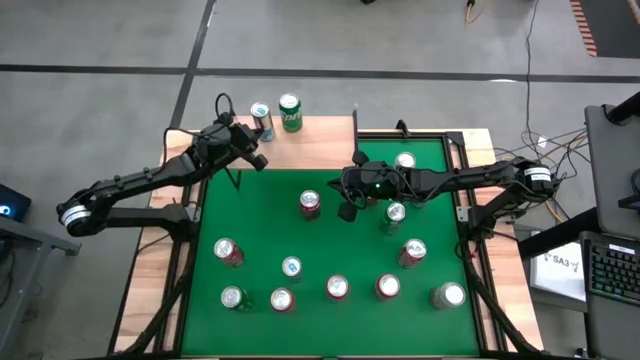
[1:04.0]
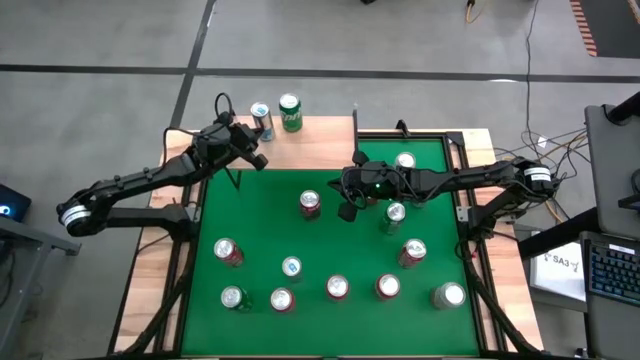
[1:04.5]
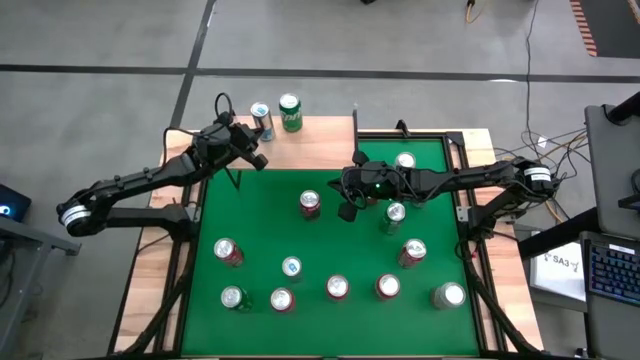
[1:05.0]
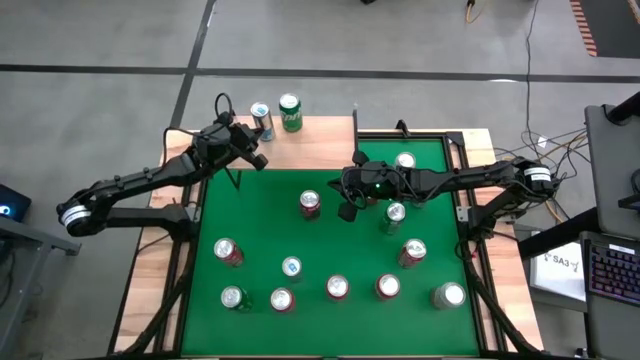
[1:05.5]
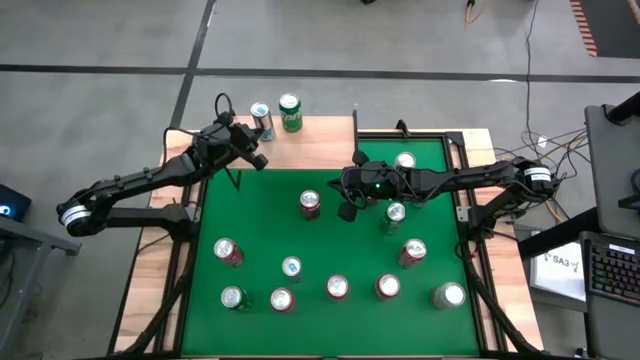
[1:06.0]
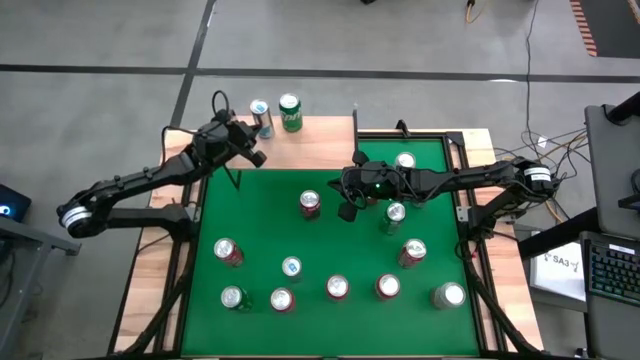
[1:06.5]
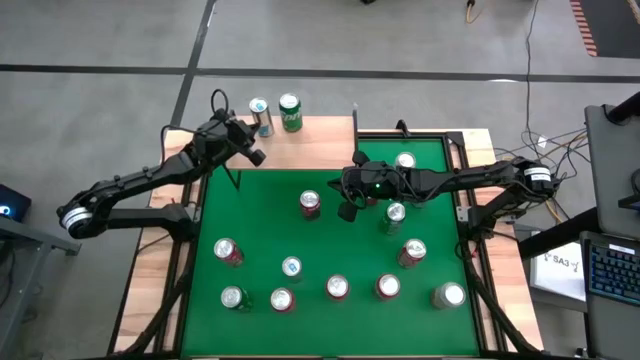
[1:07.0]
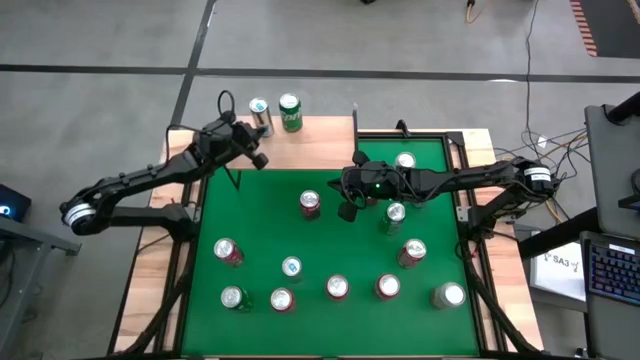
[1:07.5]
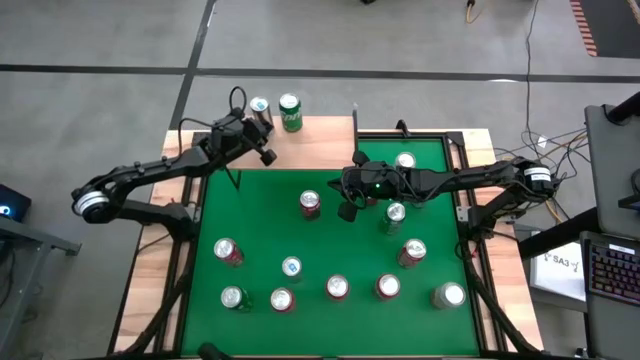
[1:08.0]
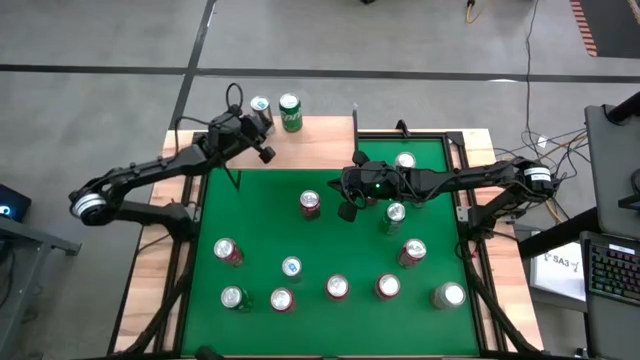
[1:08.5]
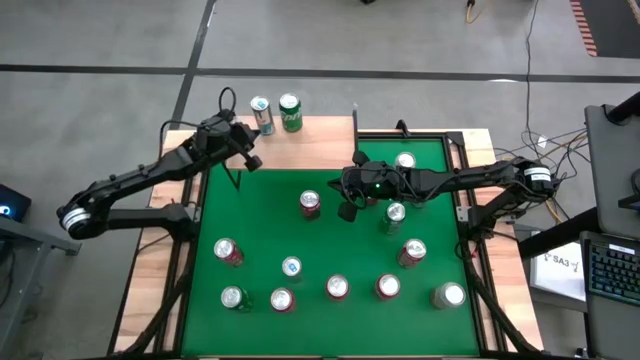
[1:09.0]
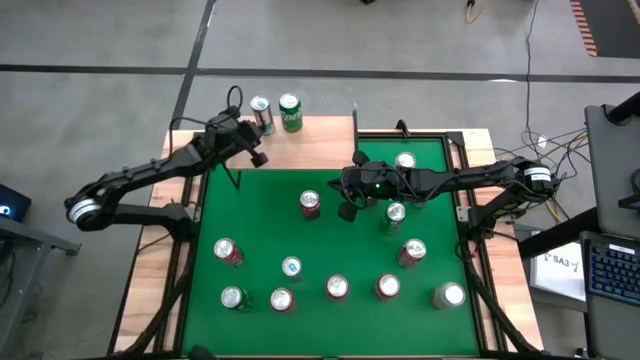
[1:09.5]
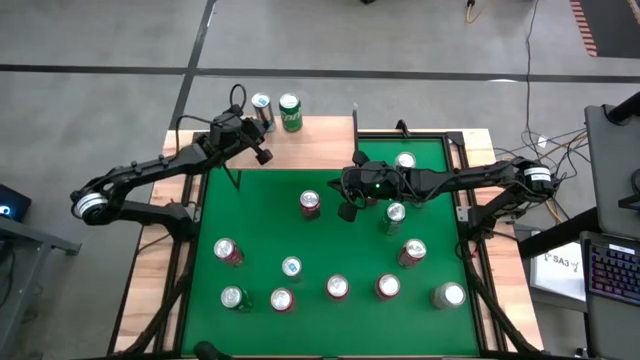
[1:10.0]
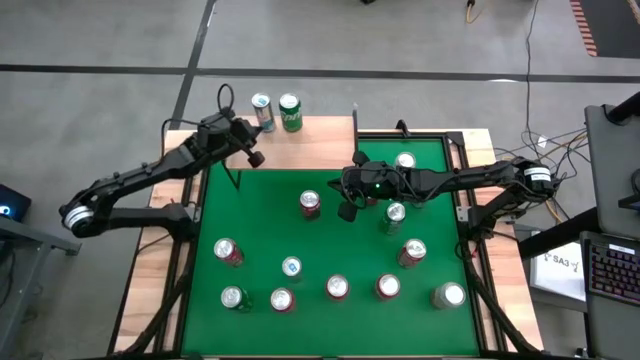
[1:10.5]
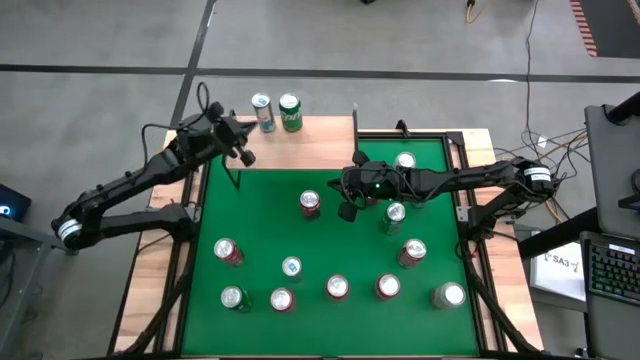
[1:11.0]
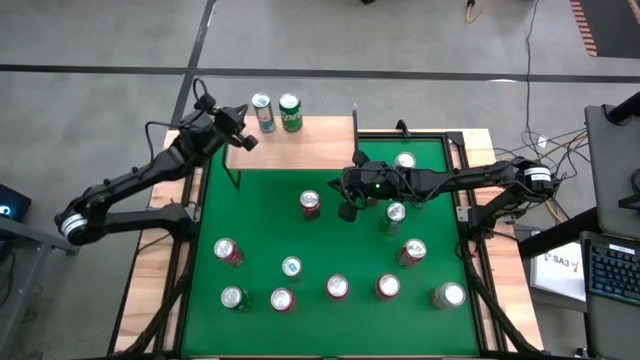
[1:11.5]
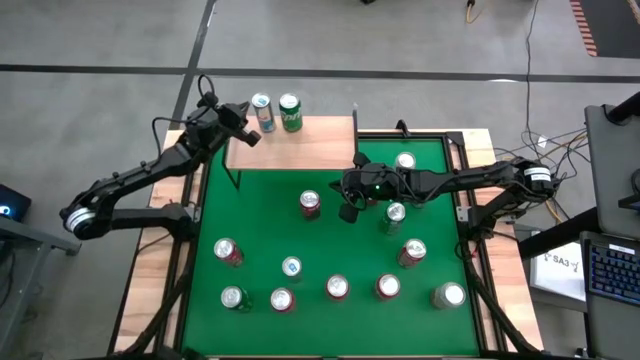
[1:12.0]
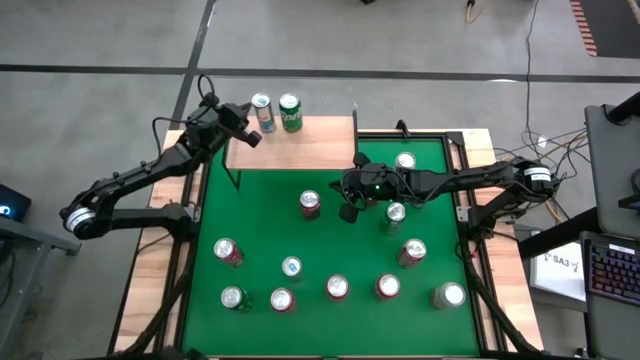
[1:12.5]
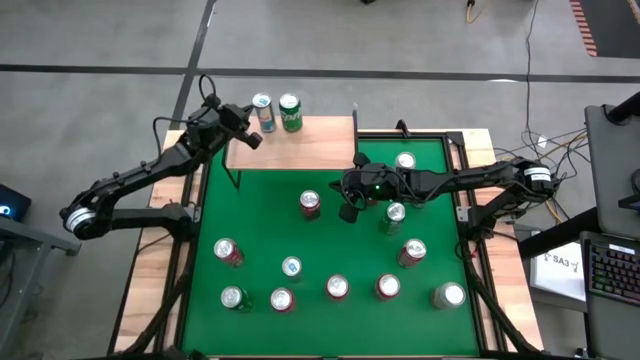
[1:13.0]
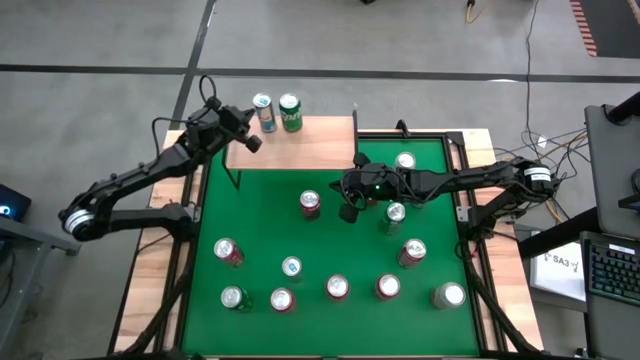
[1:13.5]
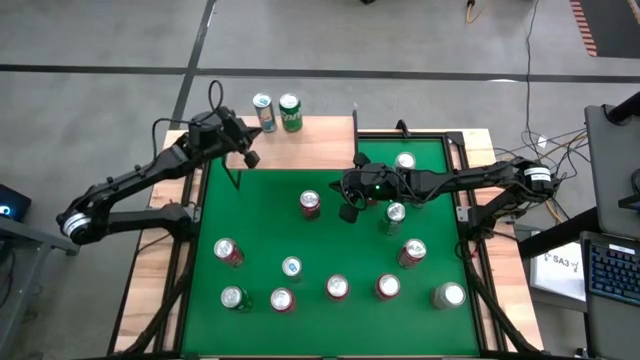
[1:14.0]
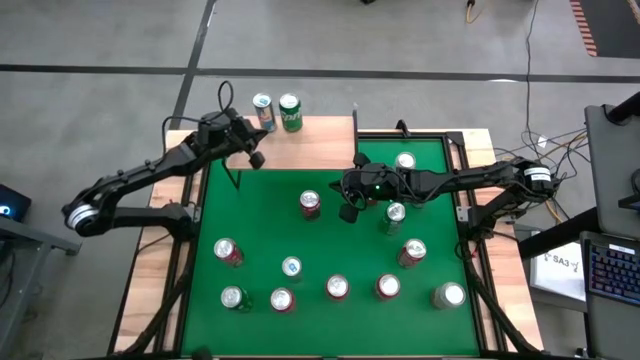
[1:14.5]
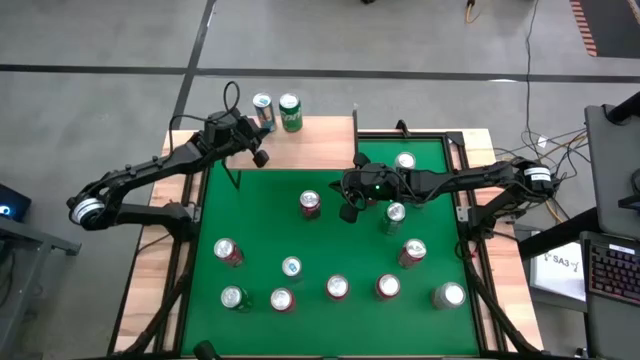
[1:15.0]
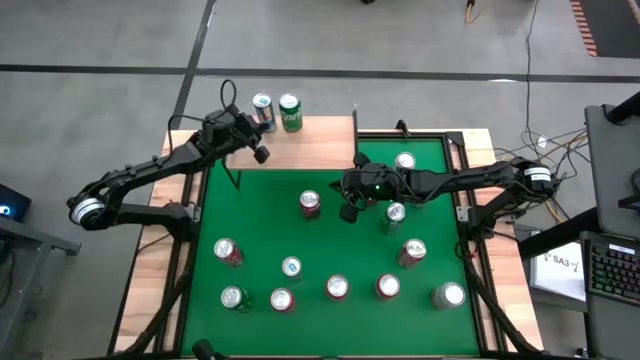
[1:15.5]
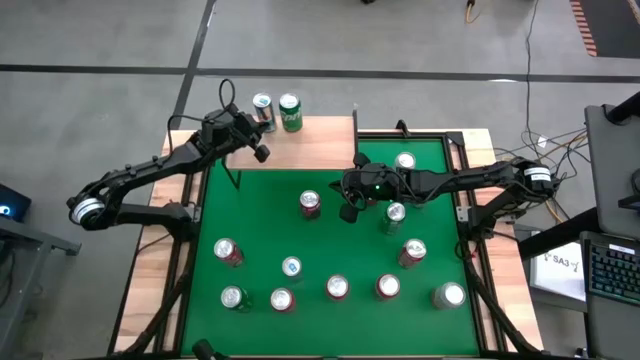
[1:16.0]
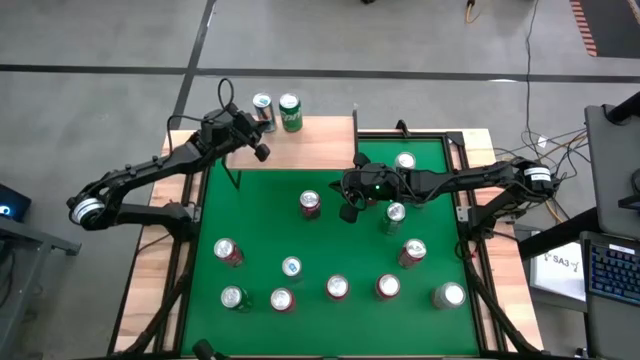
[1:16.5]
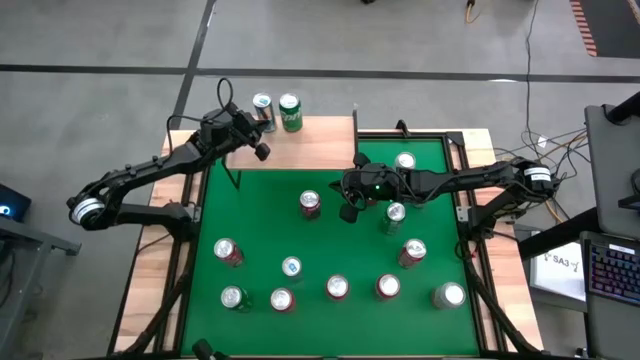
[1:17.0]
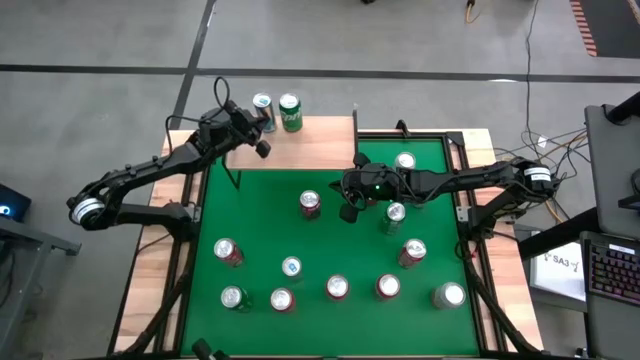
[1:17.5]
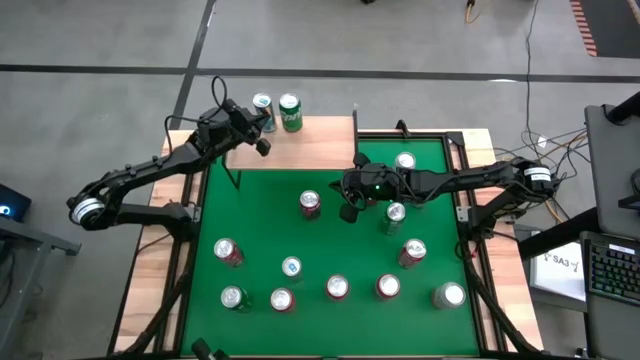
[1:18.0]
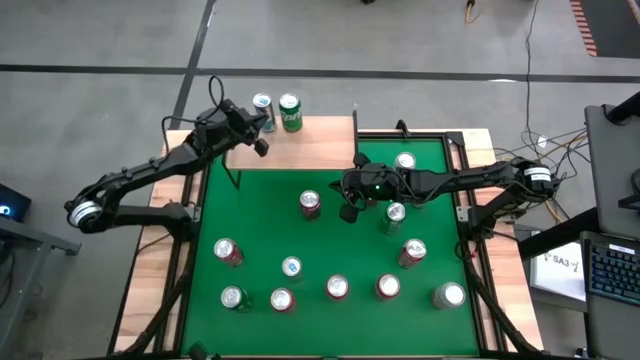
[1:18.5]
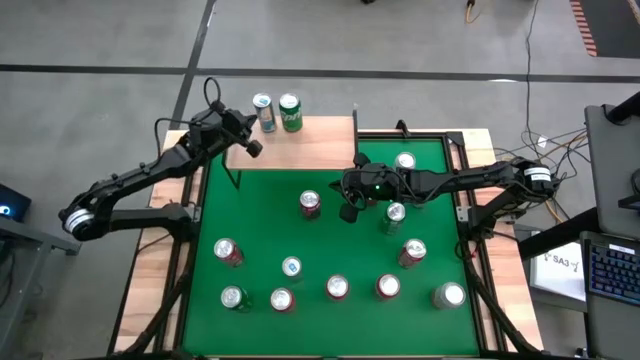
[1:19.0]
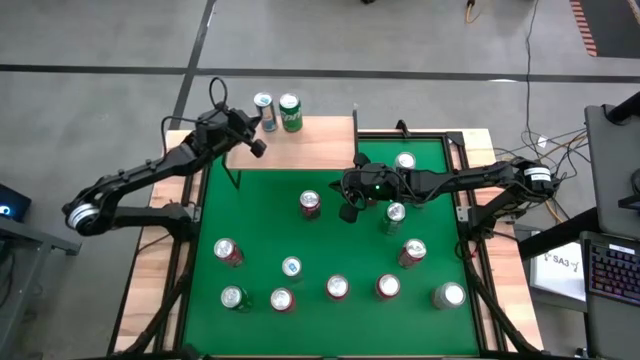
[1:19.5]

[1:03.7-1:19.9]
Task: Place canned beverage on shelf
Put the red can on the shelf
